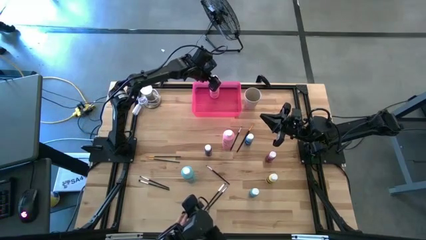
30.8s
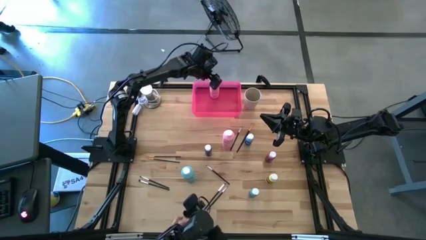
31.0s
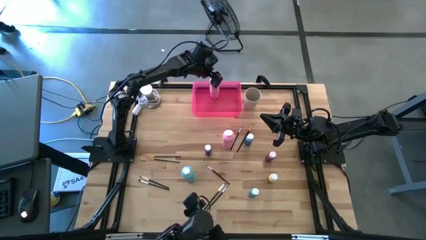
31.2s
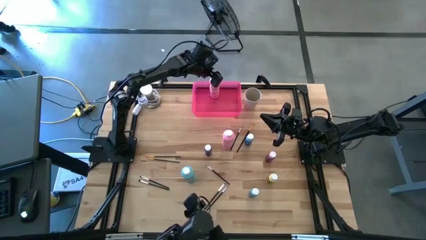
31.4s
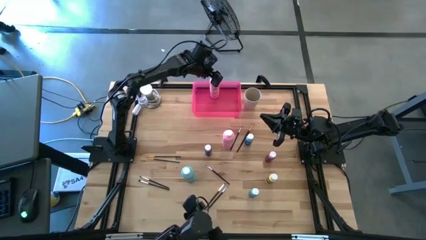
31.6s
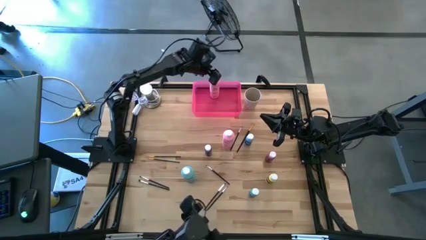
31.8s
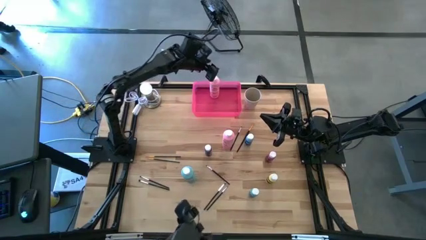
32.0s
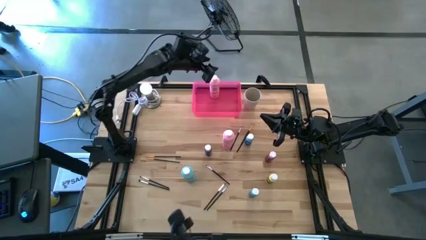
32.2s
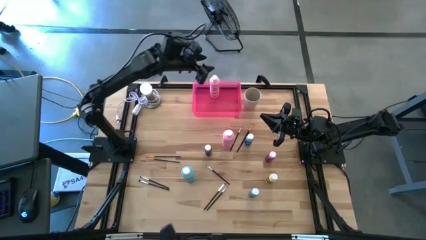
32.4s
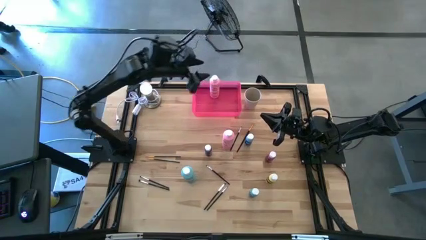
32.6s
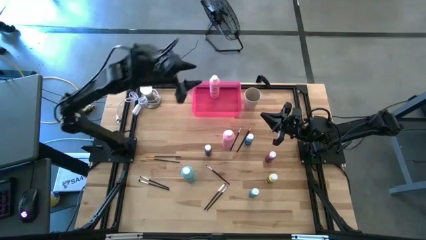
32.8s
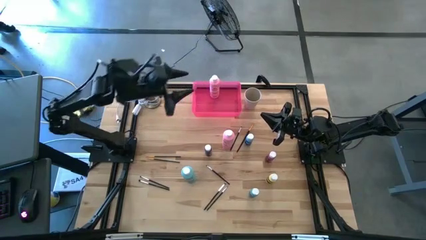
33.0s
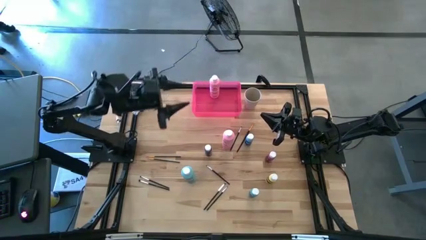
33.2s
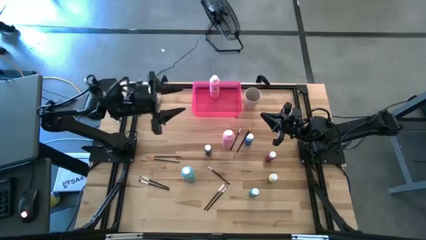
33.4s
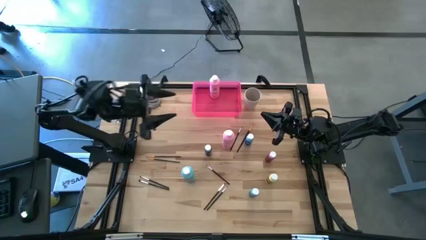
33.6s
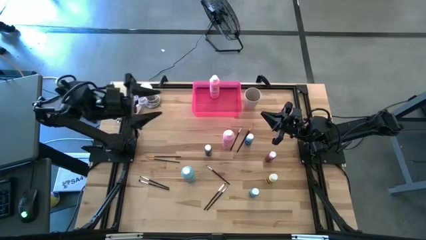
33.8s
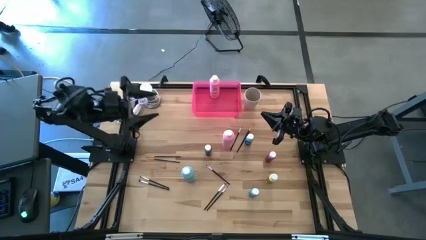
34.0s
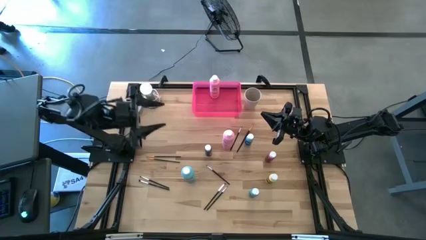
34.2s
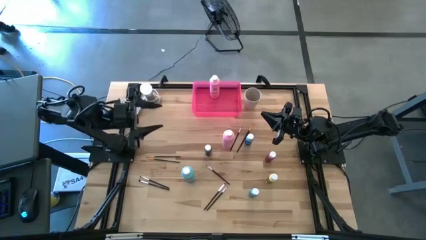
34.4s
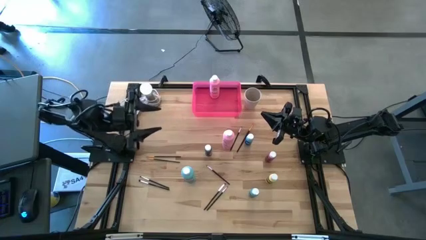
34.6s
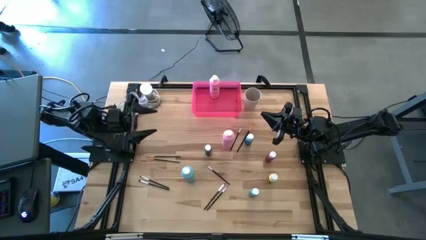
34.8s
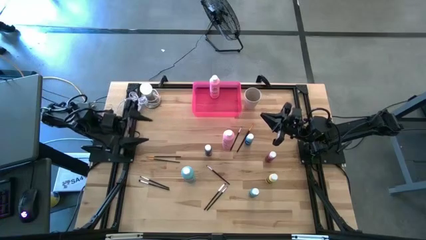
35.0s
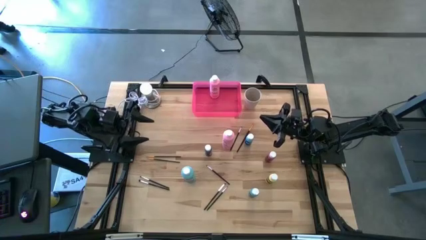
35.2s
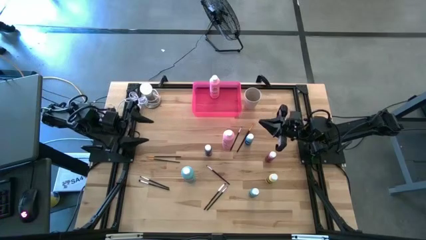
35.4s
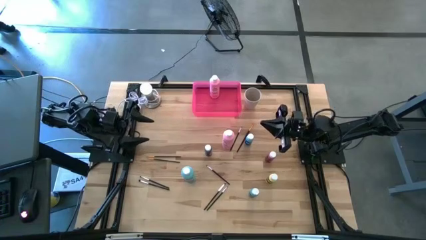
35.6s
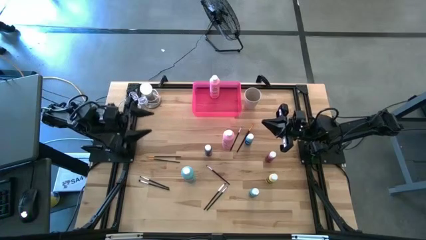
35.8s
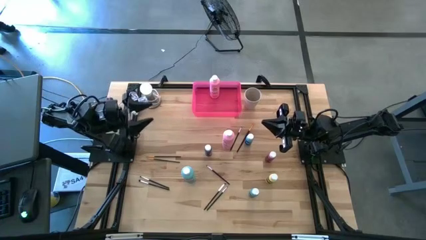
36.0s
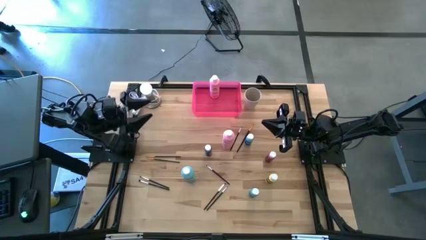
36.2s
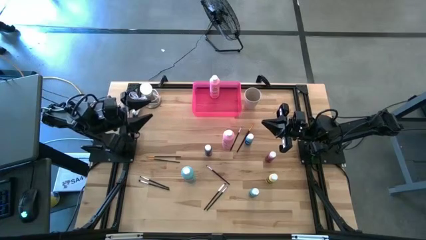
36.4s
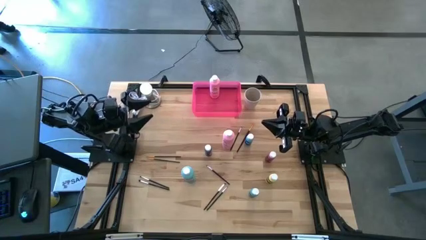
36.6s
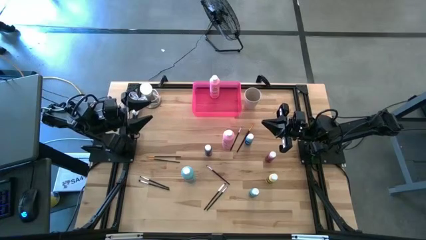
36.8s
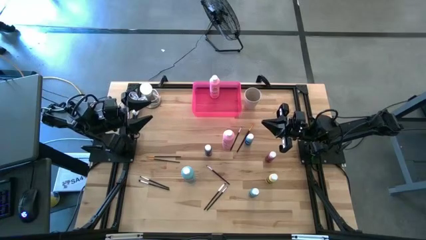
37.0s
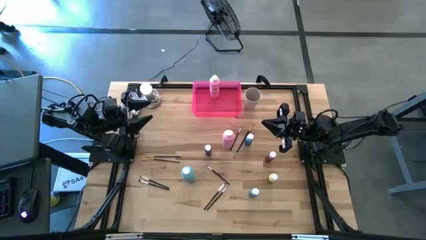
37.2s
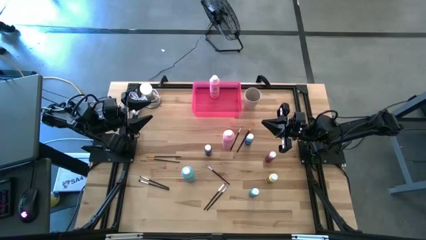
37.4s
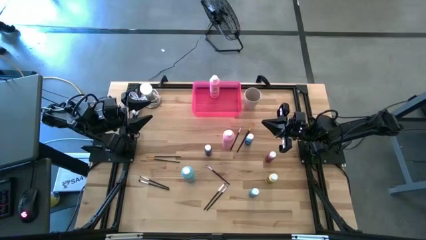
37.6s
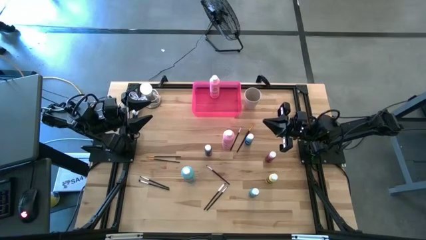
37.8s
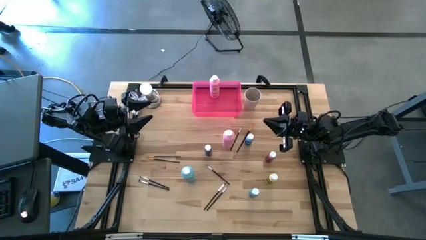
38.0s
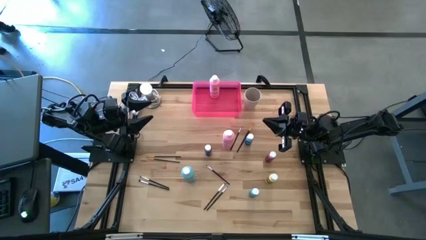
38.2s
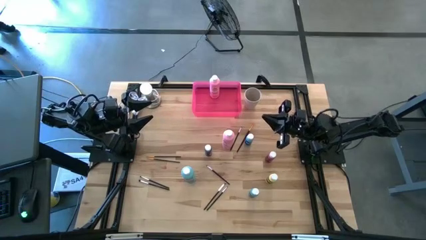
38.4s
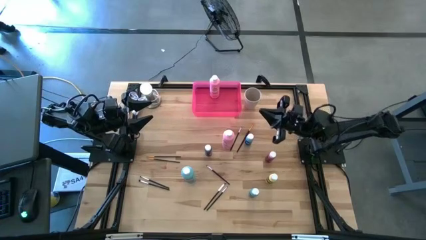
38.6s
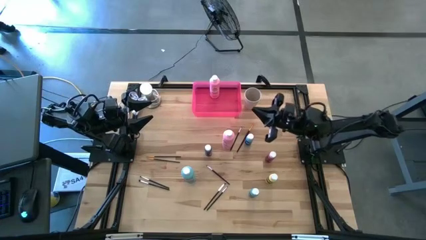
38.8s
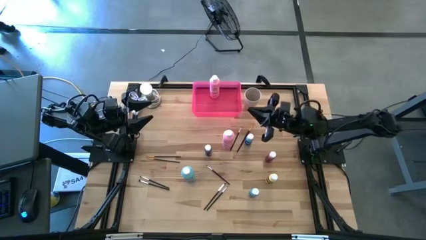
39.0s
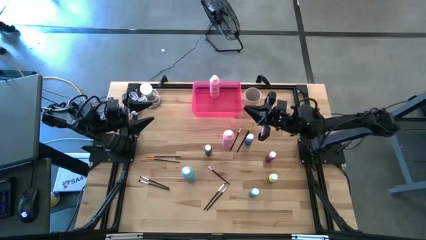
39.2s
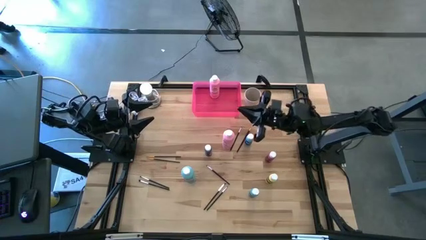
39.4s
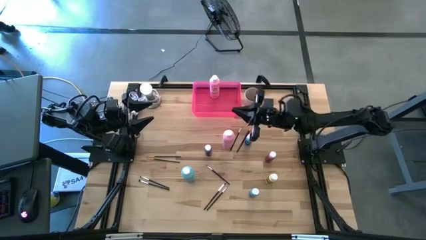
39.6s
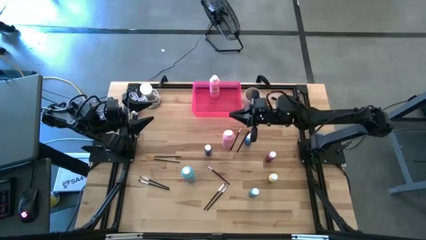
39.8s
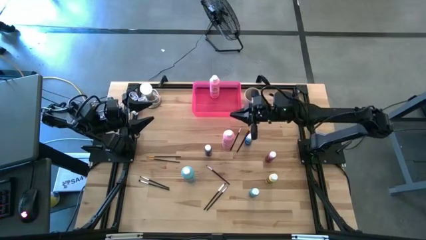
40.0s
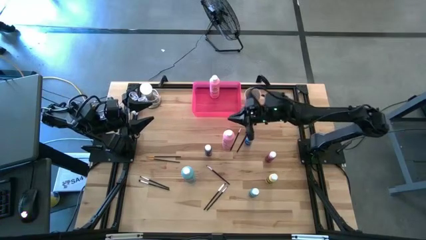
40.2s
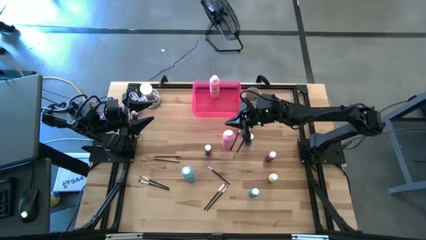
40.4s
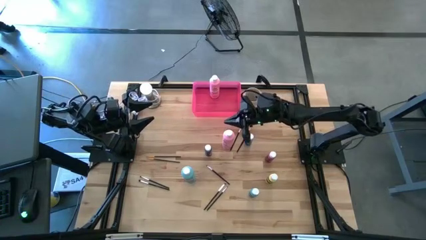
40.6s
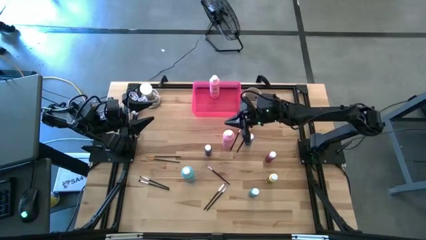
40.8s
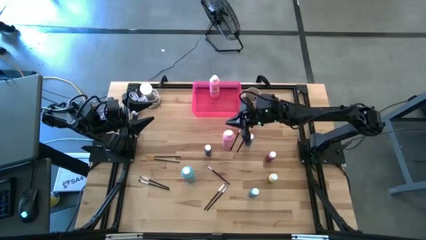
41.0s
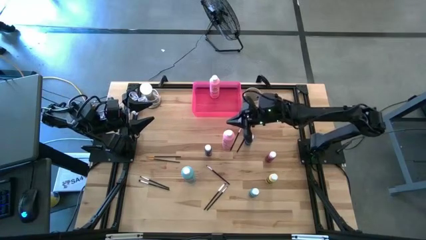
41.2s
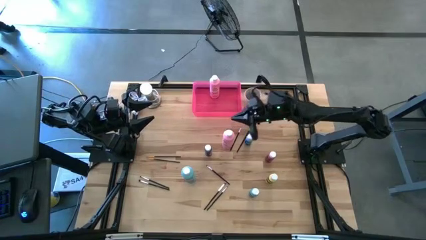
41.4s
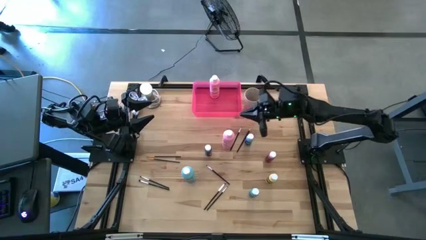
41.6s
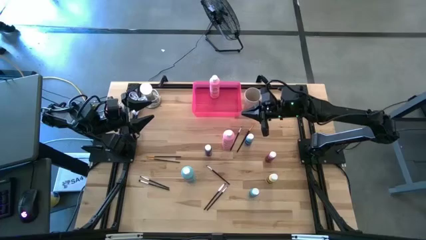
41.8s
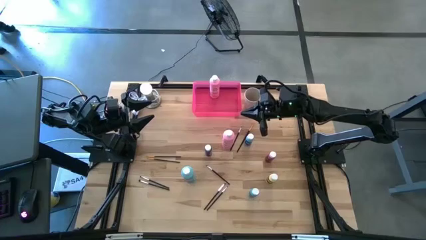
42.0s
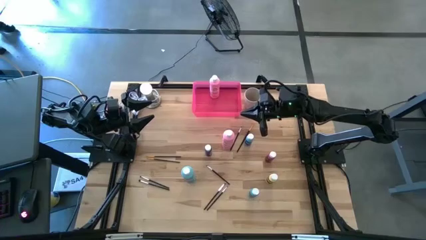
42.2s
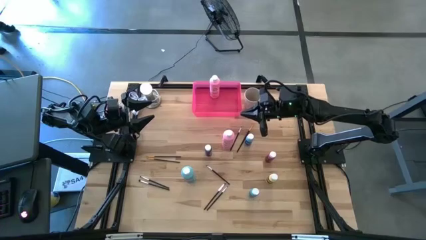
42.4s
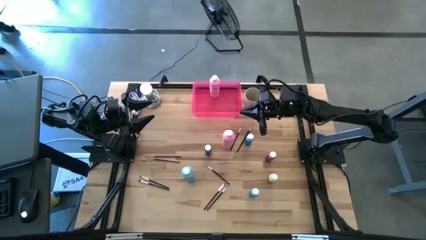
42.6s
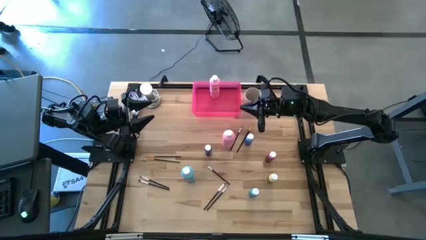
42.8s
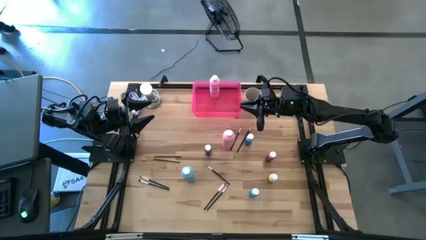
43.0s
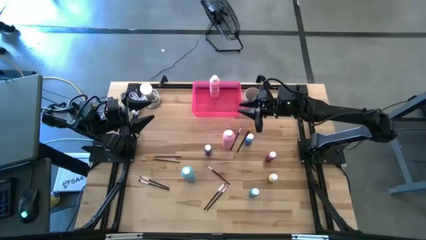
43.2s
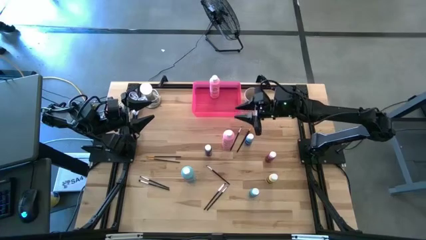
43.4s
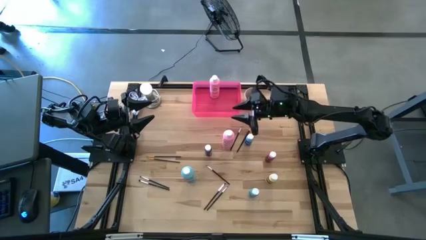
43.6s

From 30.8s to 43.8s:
Task: Pick & Place Paint Supplies
Put the big pink paint bottle into the pink bin
